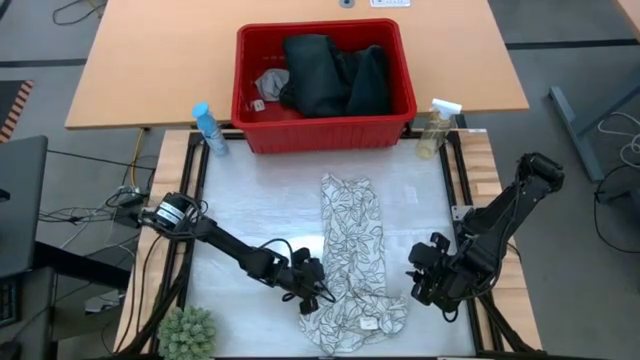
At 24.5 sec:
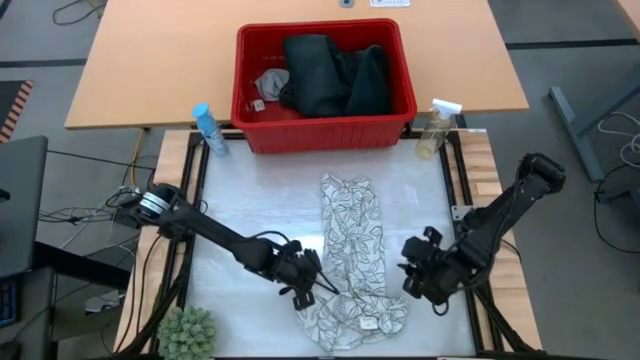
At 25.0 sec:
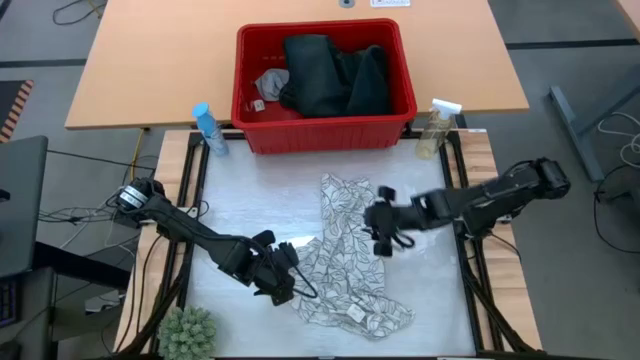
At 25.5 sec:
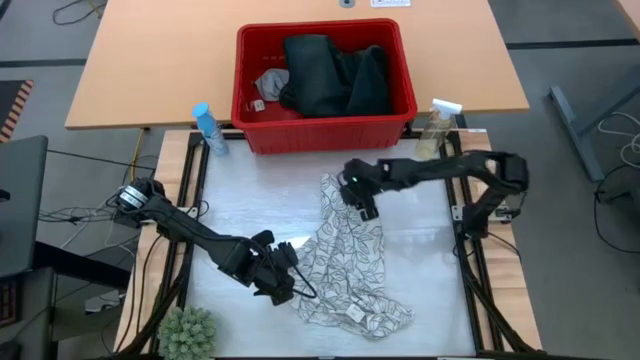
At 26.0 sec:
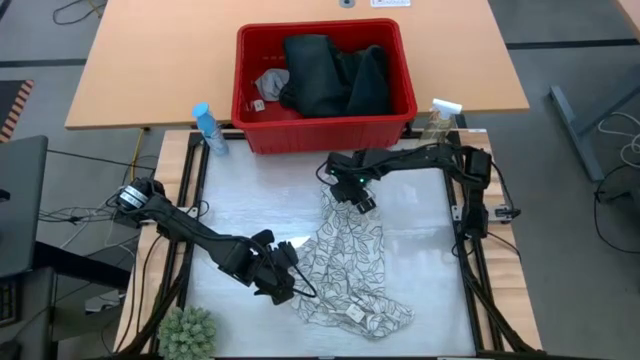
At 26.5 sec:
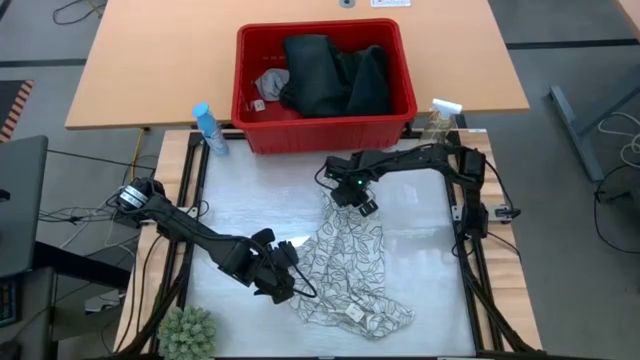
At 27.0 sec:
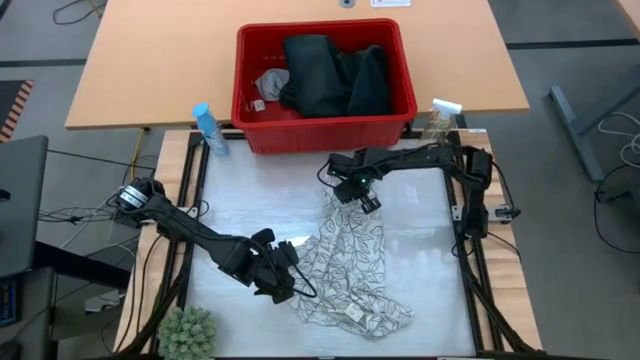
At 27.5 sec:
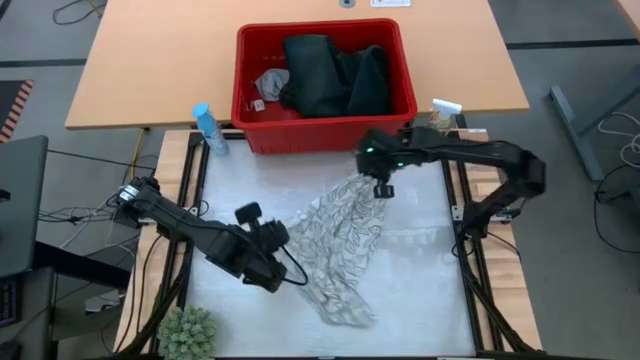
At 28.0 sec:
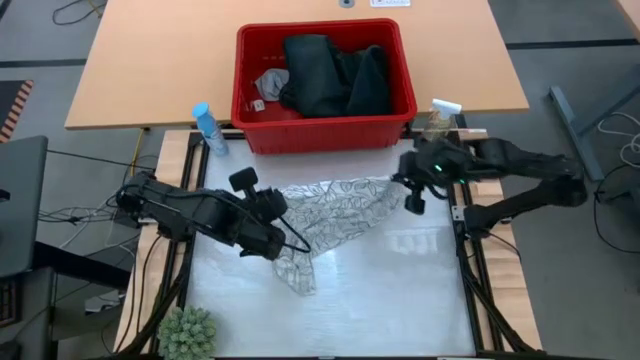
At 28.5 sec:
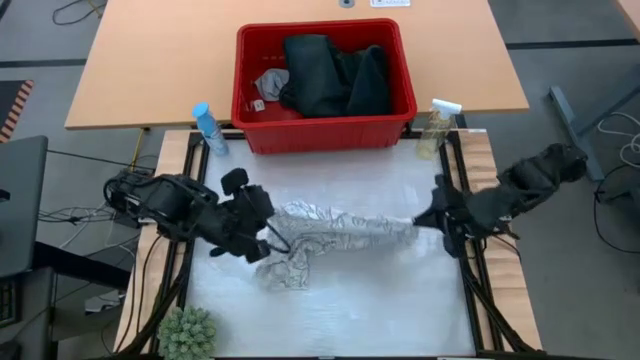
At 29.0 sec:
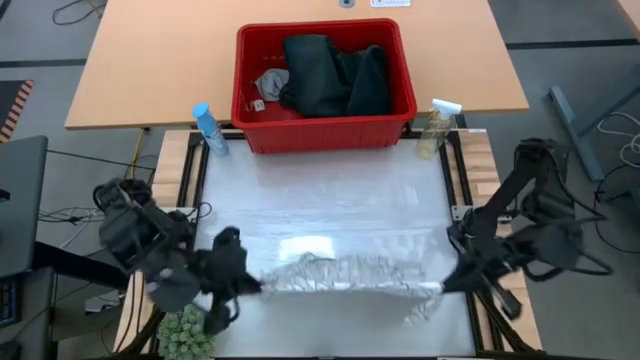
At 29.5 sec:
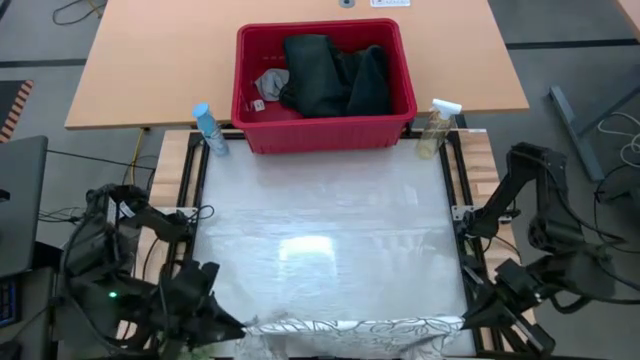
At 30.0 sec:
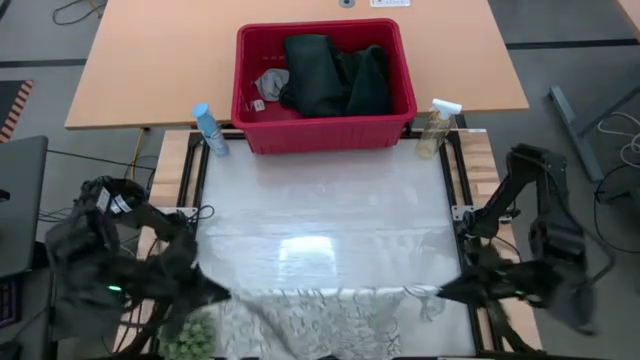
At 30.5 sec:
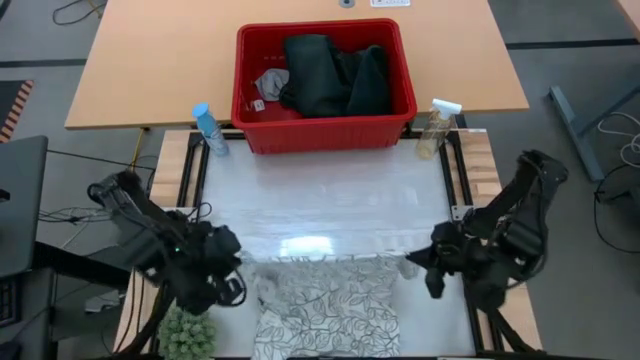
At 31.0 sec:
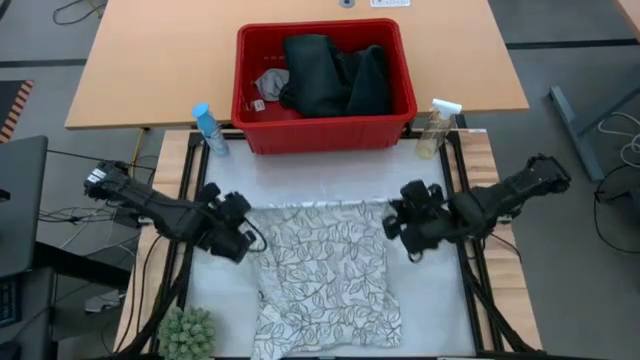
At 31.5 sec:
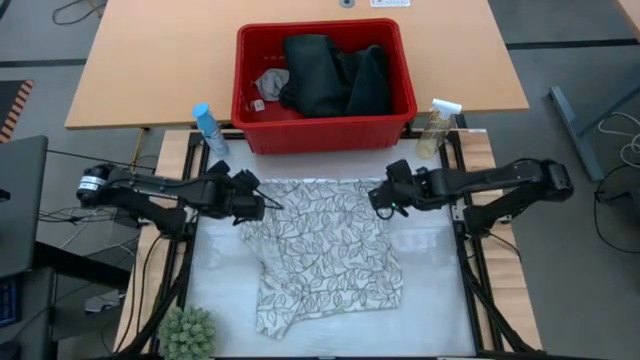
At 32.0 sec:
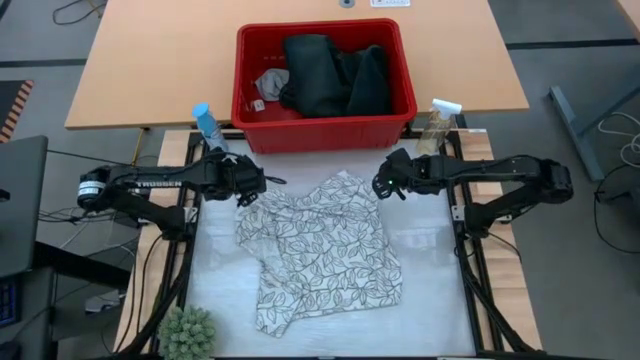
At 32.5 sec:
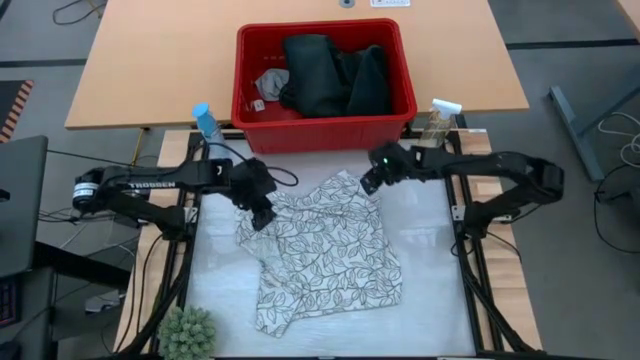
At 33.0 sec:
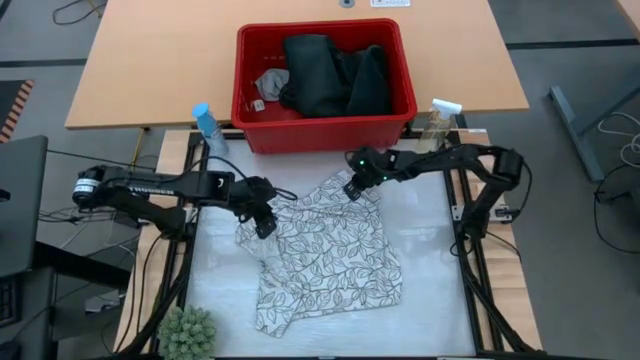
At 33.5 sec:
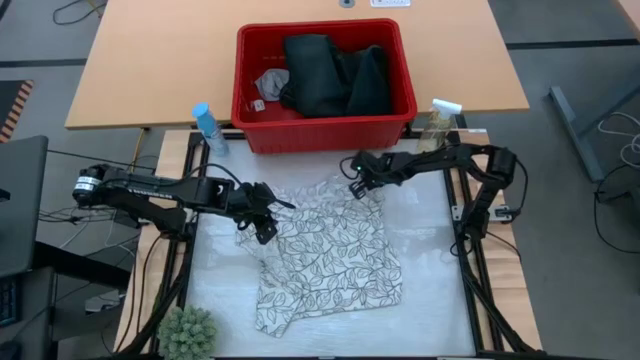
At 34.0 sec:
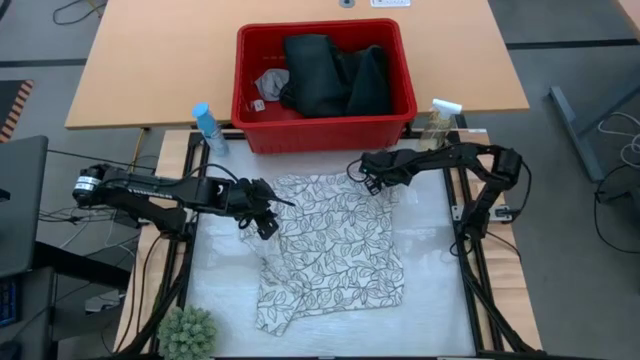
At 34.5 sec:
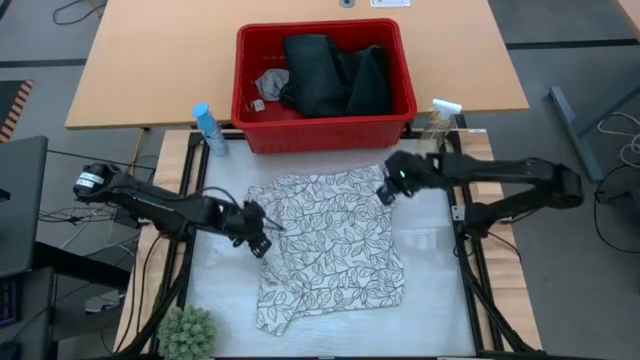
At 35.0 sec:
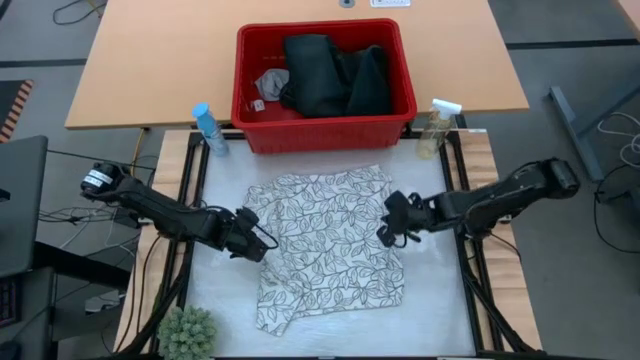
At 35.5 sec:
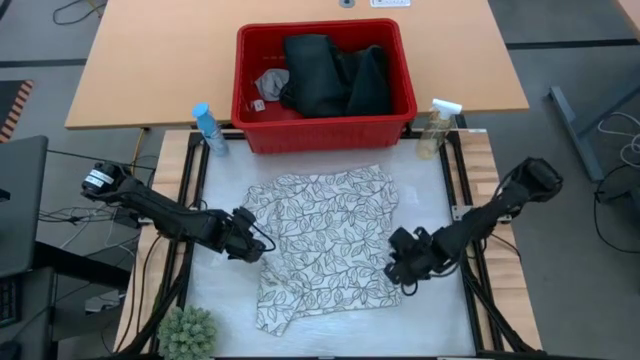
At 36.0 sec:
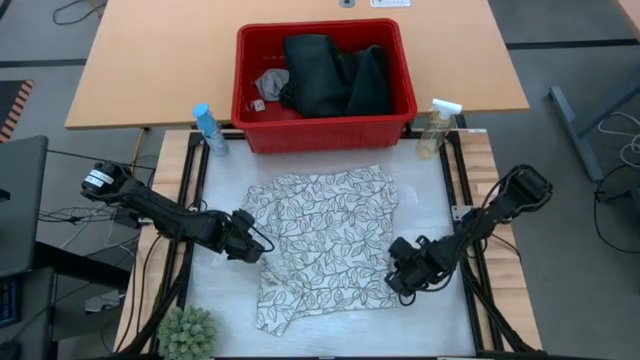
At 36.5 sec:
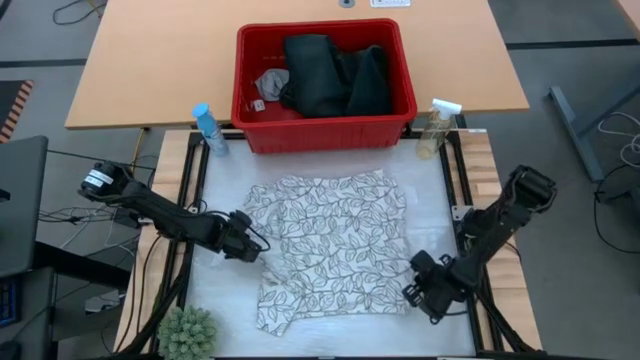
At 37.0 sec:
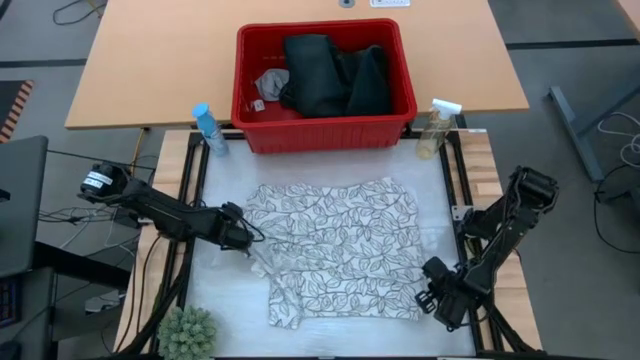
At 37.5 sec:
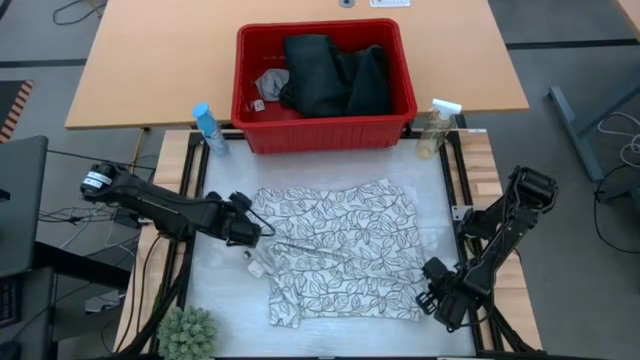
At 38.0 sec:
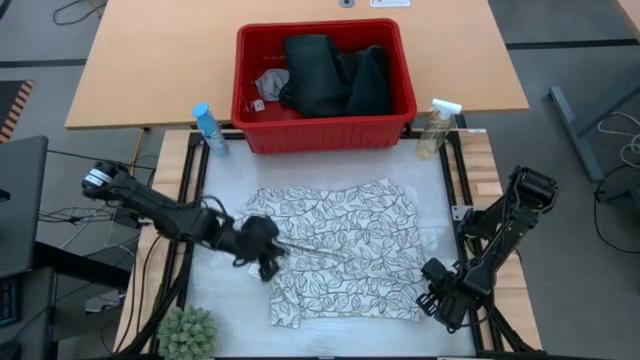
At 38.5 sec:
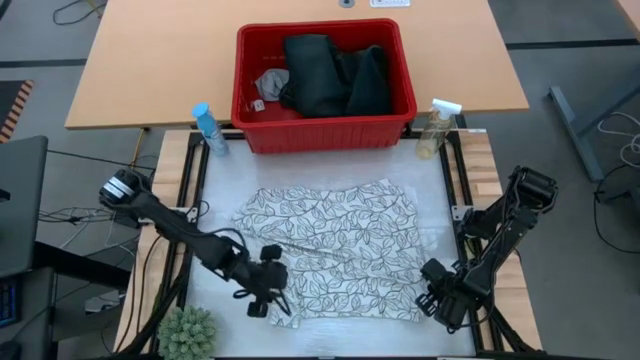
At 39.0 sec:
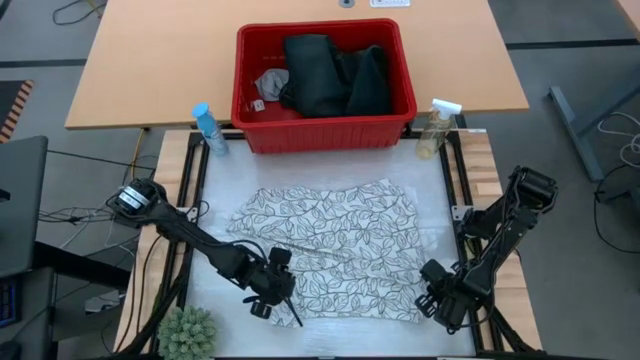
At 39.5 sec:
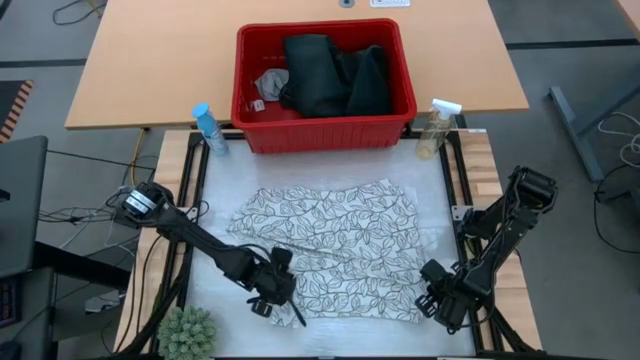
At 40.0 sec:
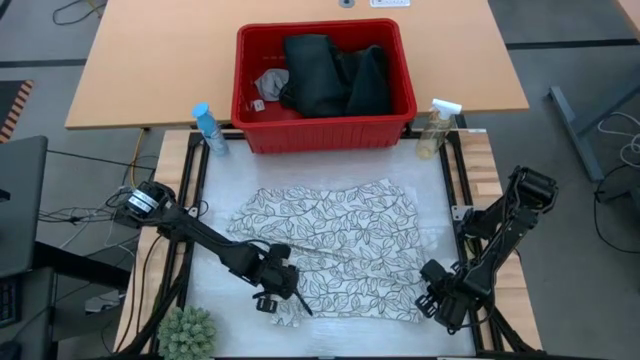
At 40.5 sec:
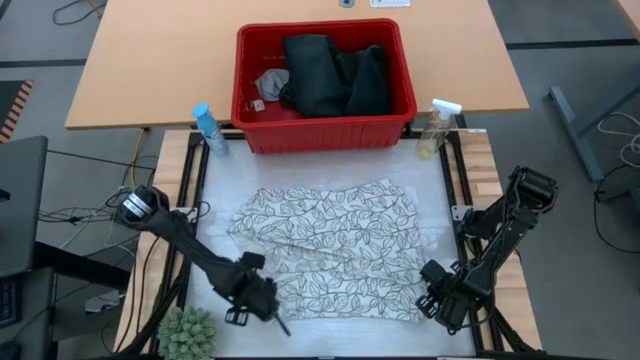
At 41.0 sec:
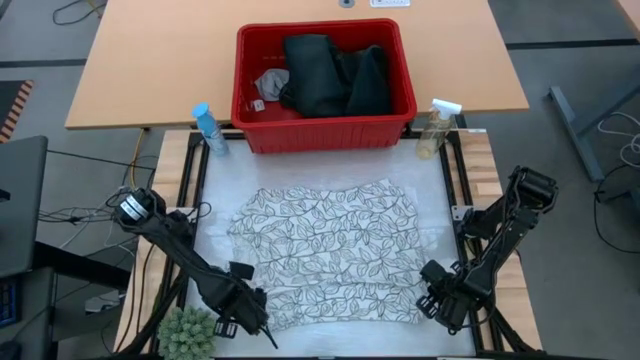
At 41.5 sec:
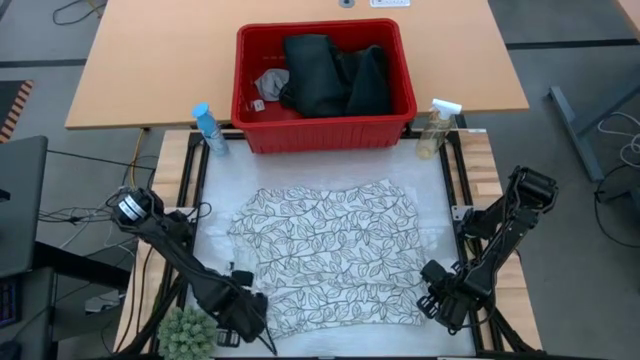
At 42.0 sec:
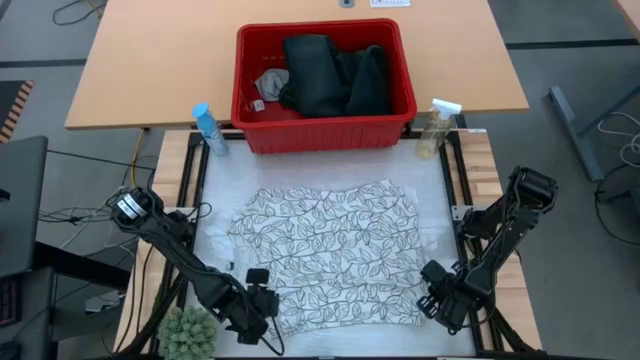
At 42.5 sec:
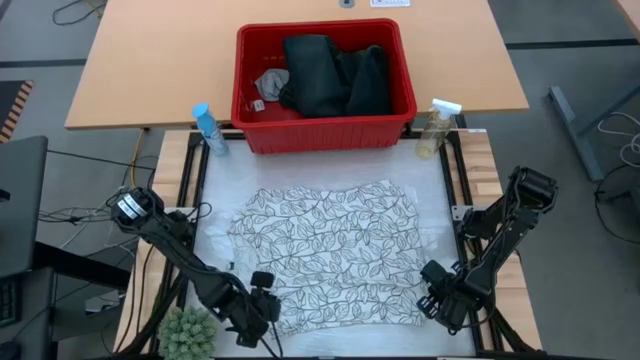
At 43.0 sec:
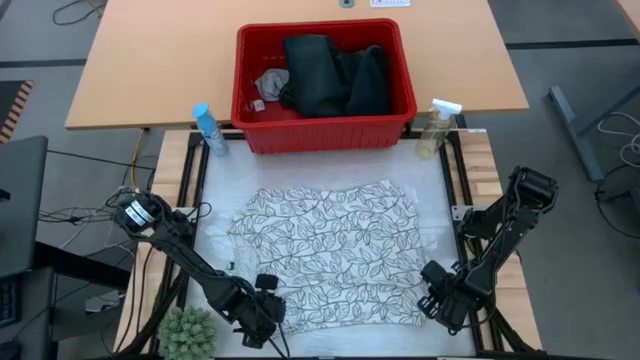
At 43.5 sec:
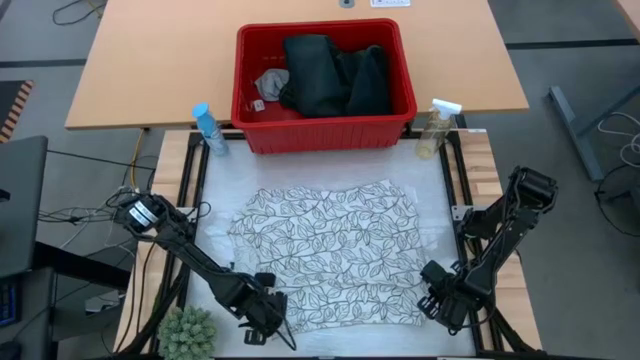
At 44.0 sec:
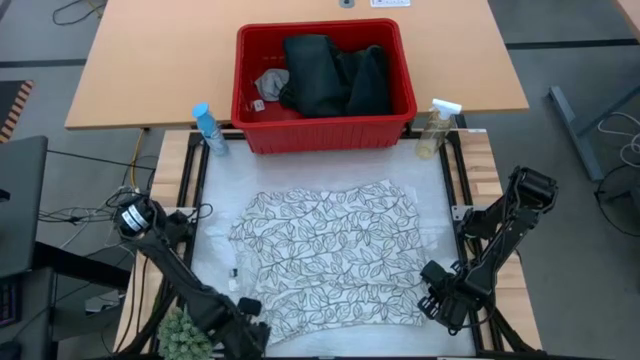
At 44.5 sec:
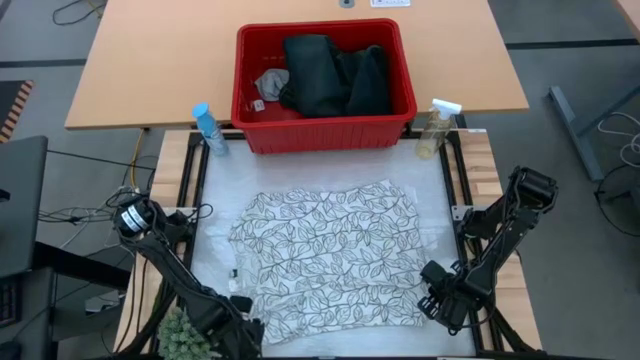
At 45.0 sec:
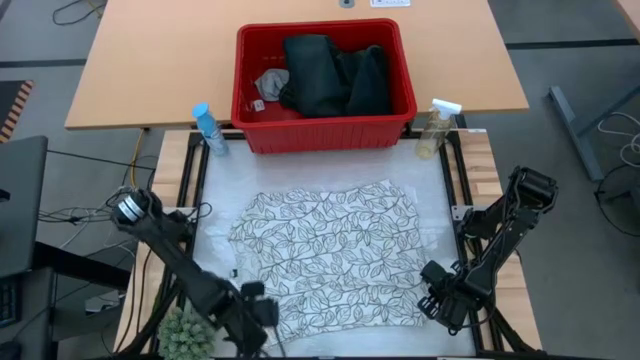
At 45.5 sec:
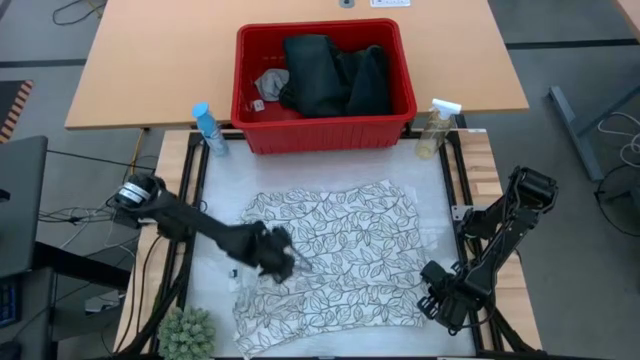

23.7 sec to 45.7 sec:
Task: Fold laundry
Fold the white-patterned shirt
